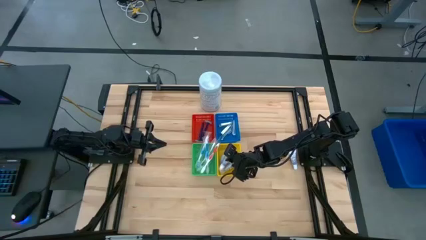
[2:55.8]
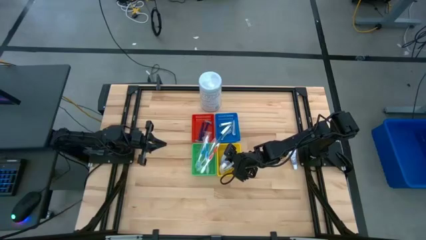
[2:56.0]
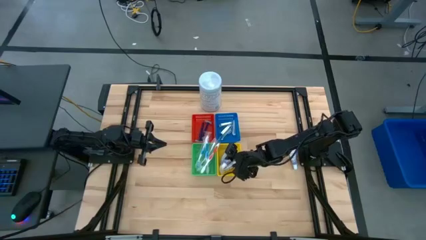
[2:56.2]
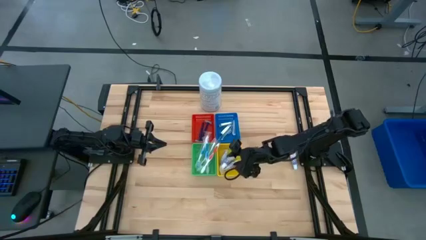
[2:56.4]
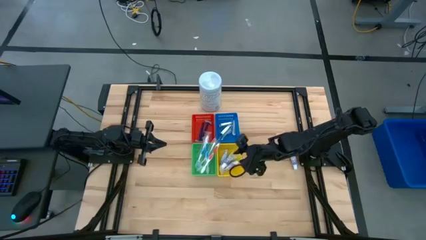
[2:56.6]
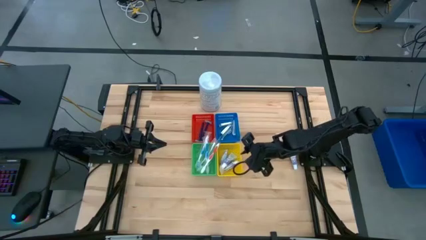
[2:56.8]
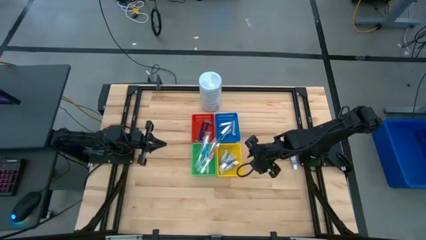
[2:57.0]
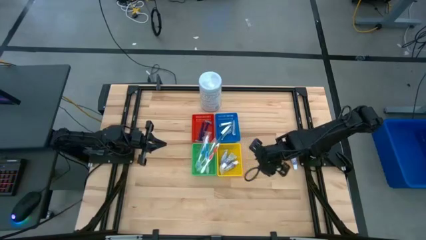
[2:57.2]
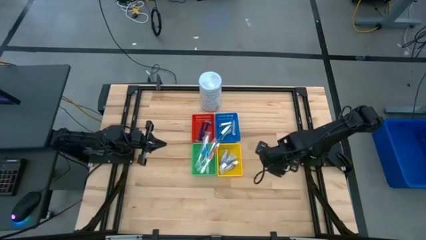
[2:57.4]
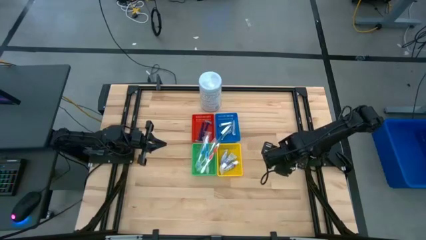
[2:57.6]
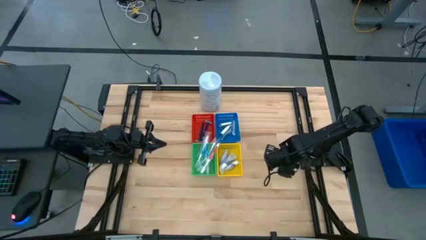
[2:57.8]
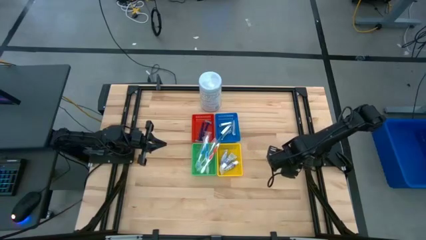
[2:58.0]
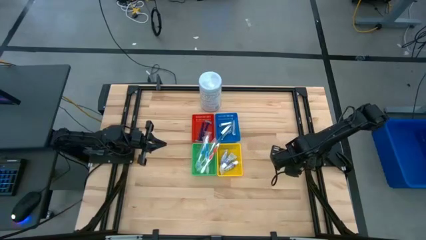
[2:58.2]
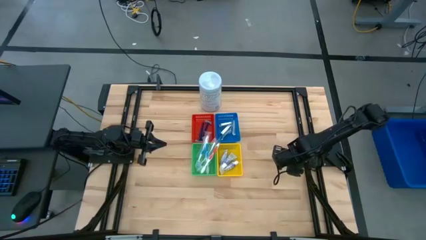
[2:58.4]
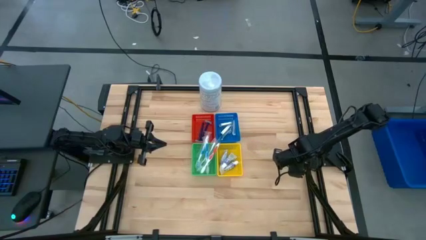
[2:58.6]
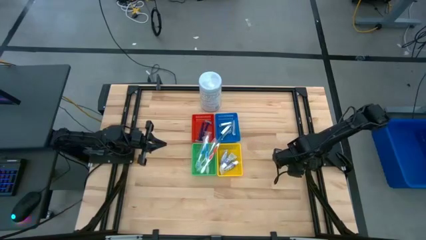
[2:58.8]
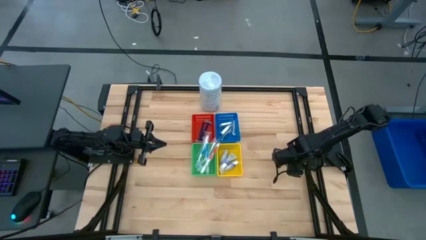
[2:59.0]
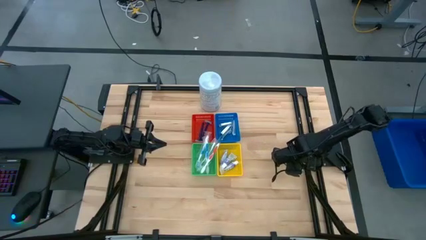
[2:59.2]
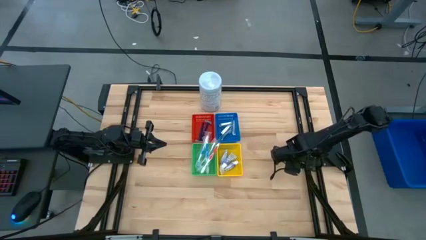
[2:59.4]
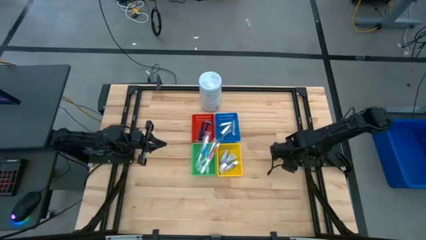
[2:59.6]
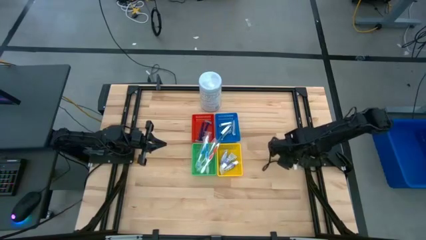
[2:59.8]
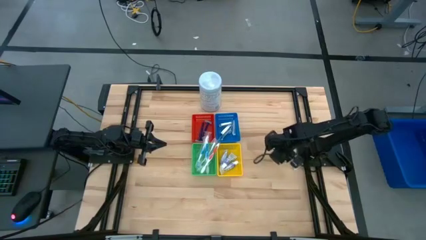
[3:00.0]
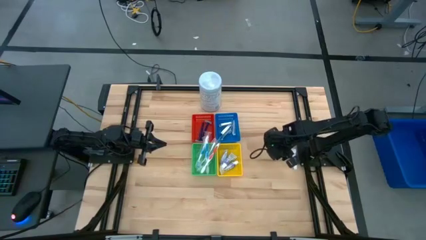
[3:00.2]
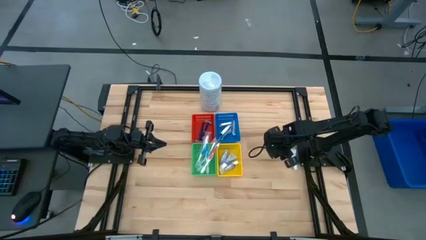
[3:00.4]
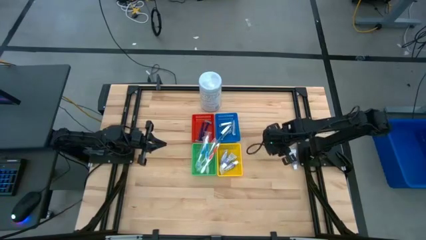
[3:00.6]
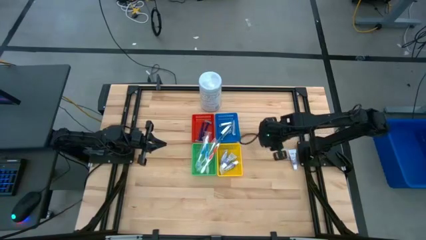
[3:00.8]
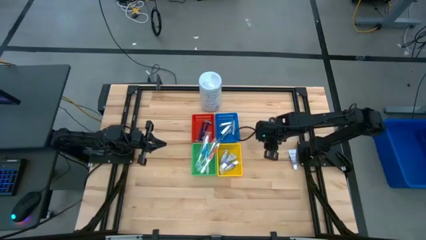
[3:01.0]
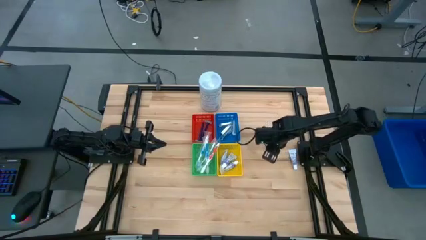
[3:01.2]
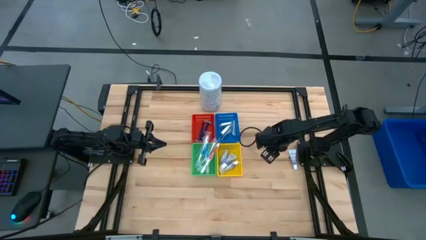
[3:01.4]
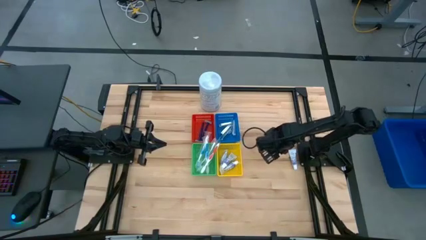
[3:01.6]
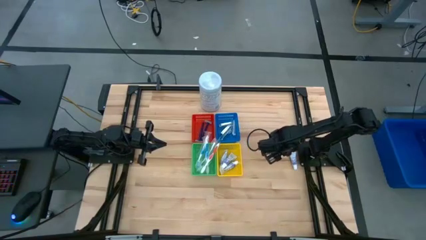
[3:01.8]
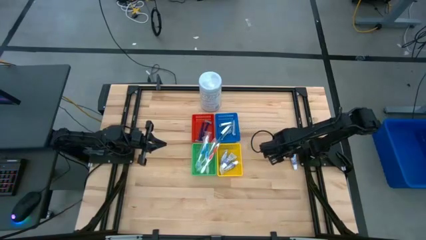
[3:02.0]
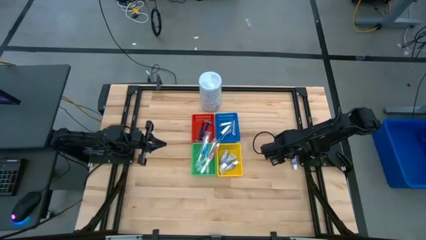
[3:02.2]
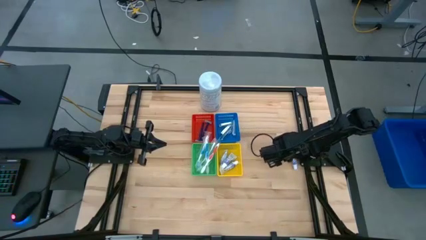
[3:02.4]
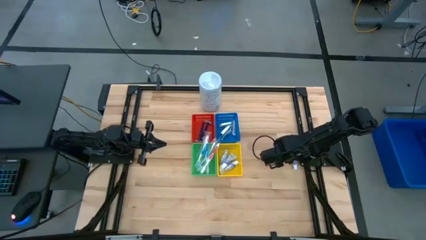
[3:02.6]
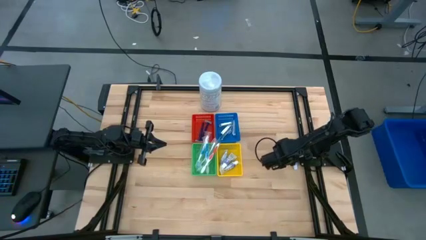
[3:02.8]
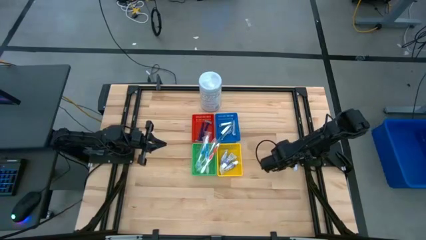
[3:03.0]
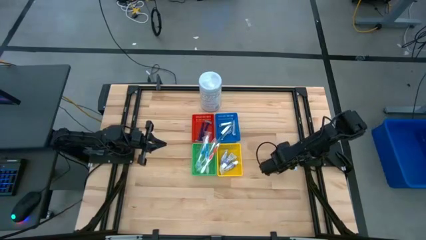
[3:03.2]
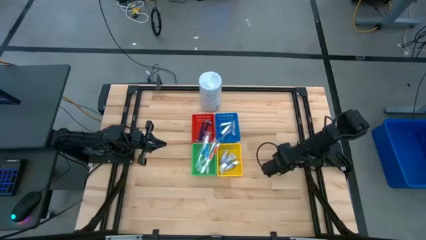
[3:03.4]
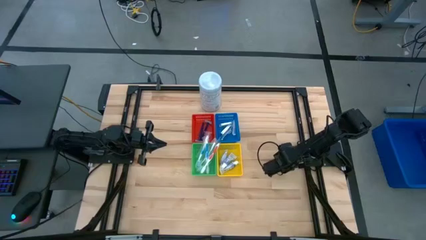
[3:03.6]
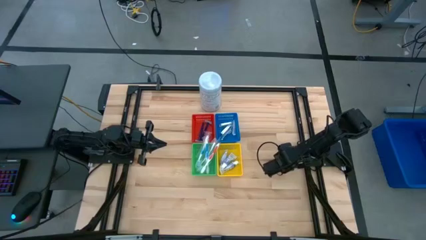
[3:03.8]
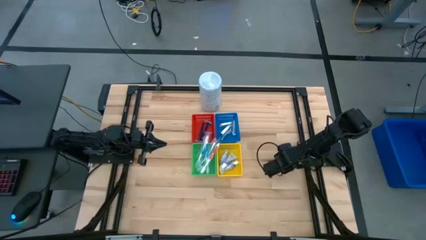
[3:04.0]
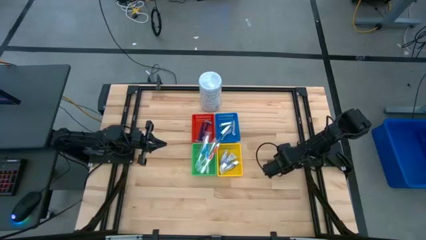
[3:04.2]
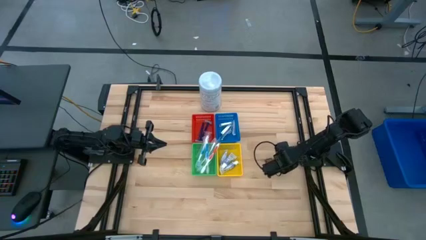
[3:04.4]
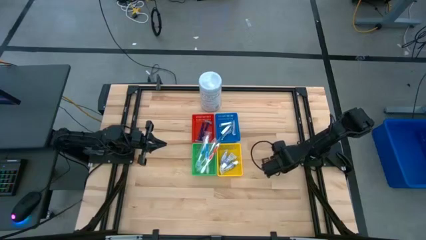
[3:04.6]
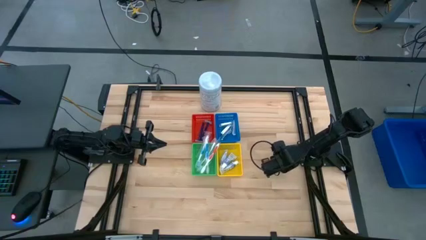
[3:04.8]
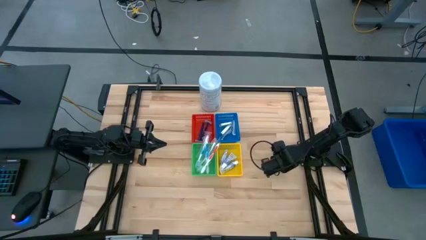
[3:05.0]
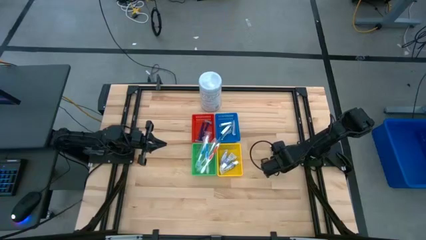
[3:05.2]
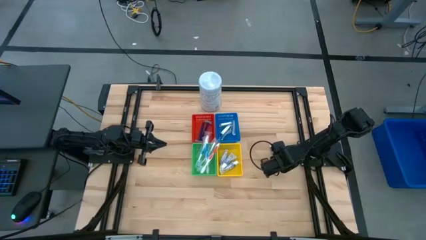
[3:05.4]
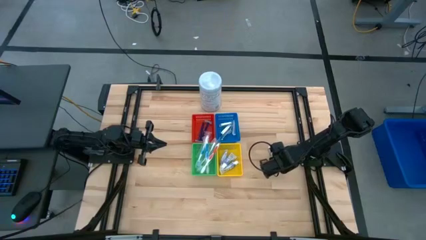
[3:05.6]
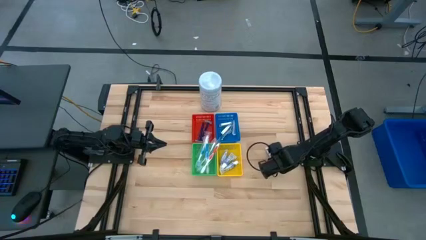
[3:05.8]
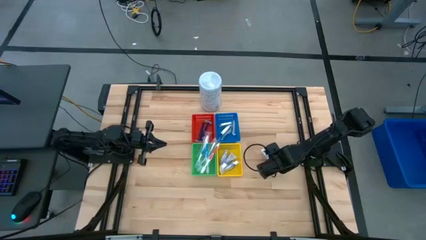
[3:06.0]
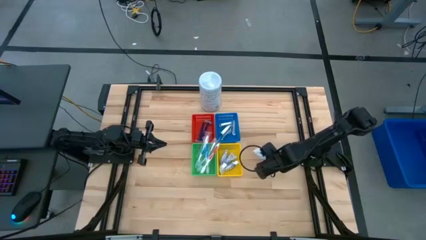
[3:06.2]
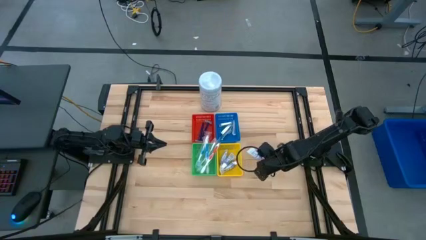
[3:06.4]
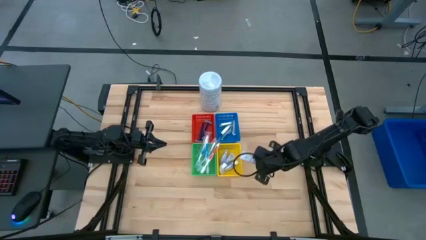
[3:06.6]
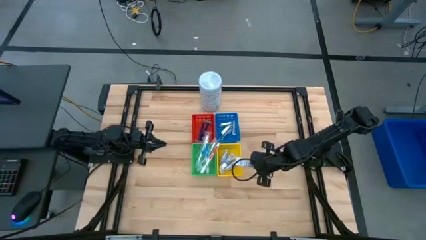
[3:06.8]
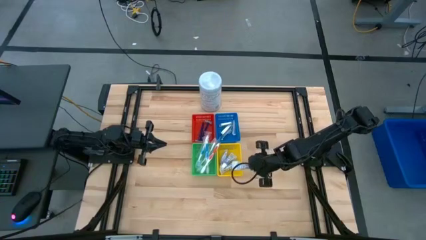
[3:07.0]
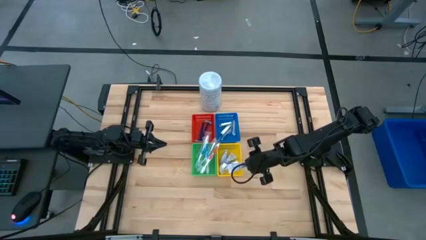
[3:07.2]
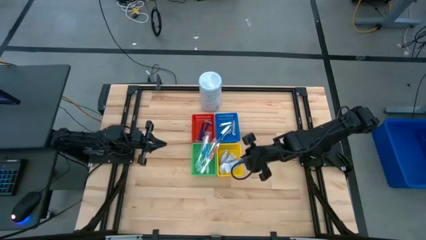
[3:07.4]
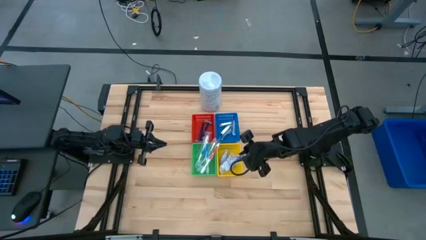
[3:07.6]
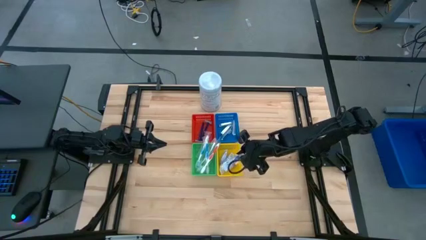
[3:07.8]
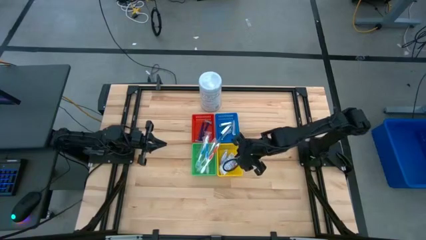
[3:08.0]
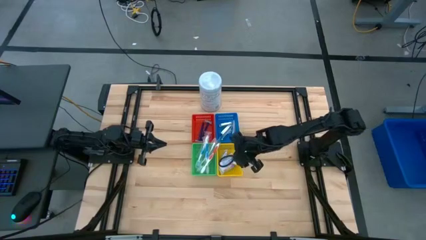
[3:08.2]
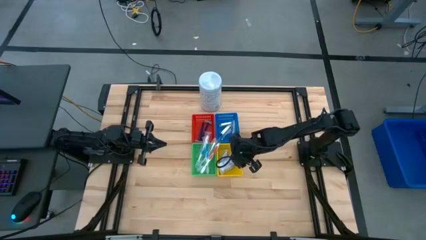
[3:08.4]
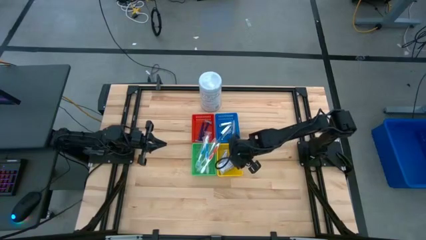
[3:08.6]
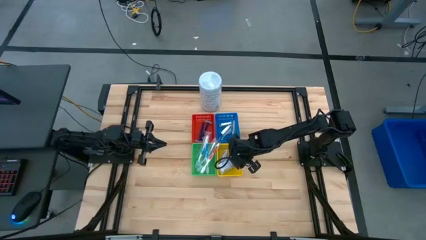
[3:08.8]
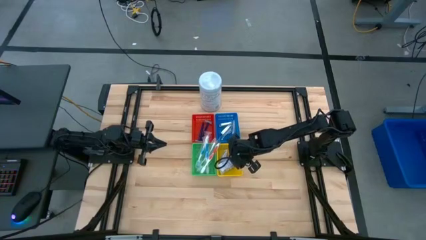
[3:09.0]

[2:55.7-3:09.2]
Task: Pick & Place Travel size toiletries
Put the white toothpaste into the yellow bin

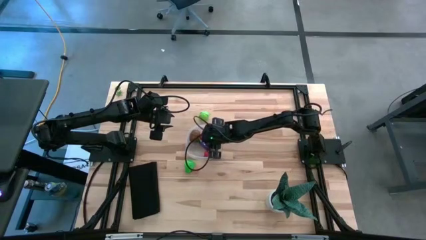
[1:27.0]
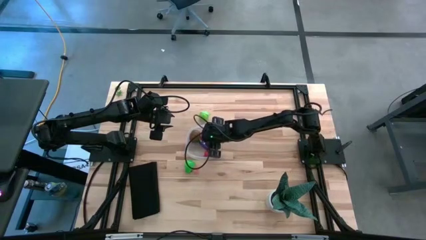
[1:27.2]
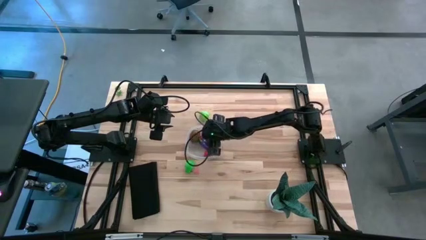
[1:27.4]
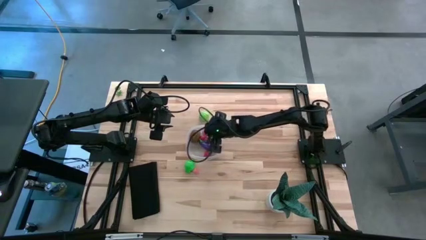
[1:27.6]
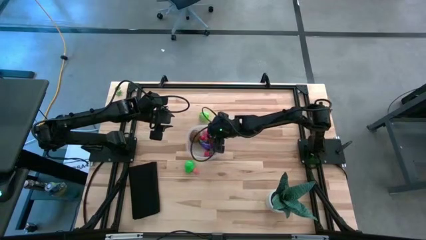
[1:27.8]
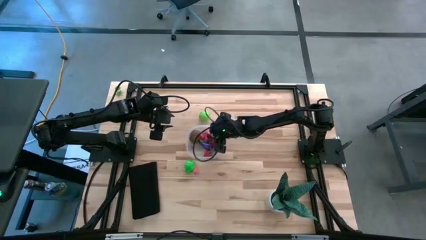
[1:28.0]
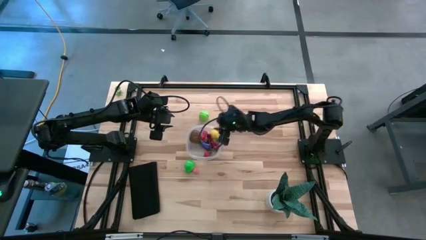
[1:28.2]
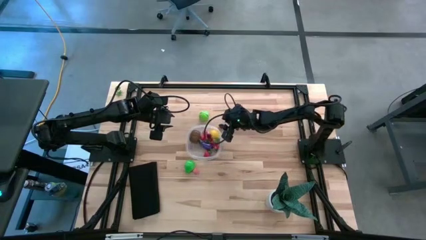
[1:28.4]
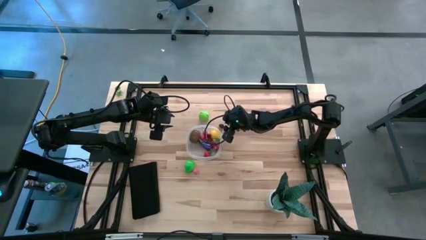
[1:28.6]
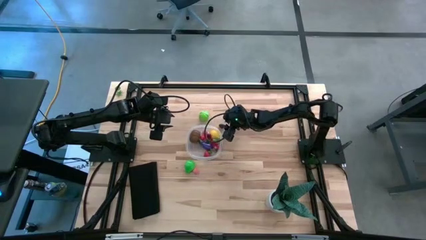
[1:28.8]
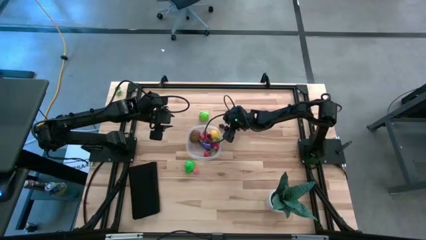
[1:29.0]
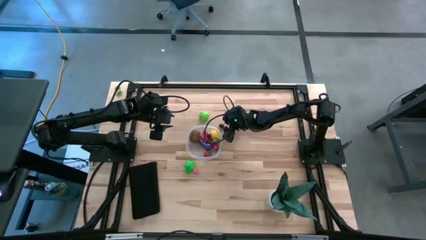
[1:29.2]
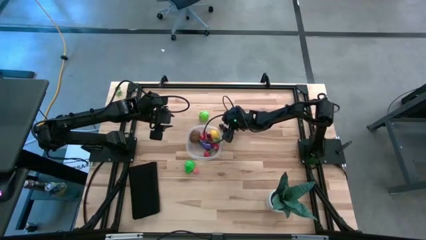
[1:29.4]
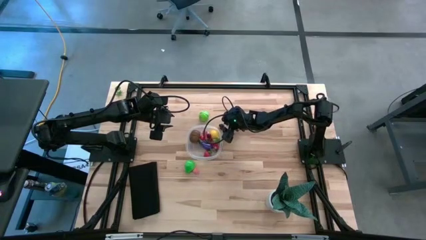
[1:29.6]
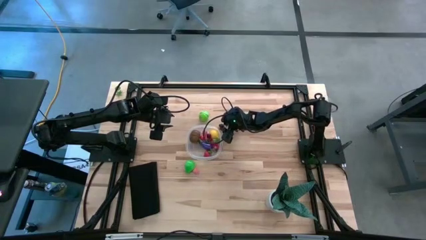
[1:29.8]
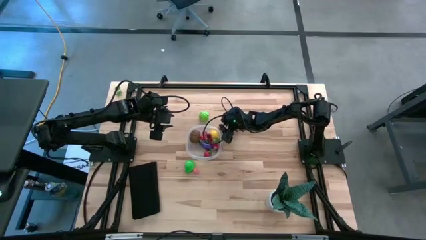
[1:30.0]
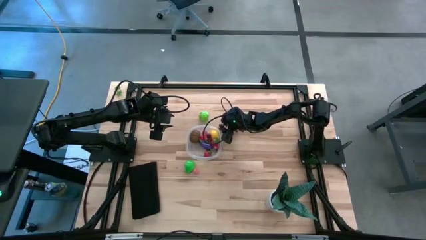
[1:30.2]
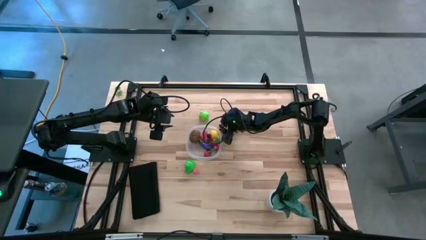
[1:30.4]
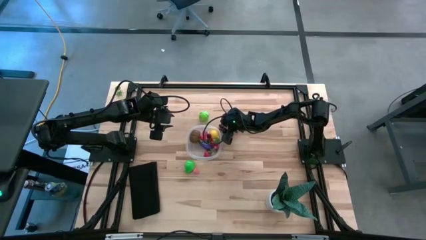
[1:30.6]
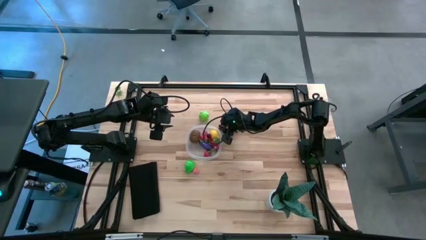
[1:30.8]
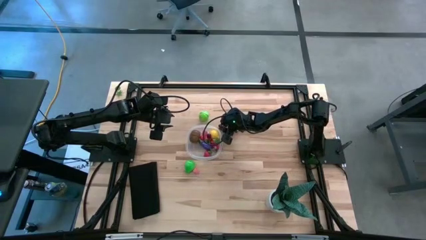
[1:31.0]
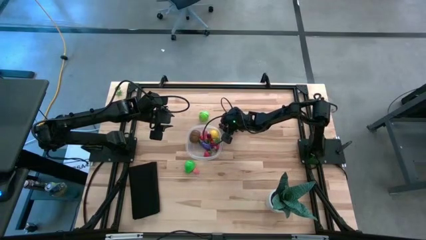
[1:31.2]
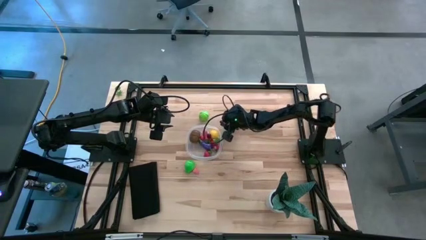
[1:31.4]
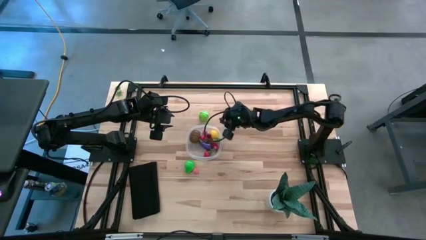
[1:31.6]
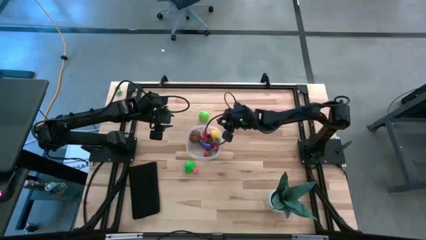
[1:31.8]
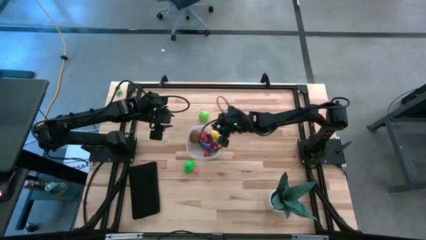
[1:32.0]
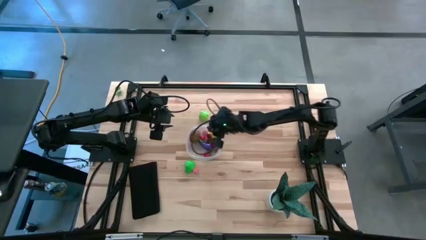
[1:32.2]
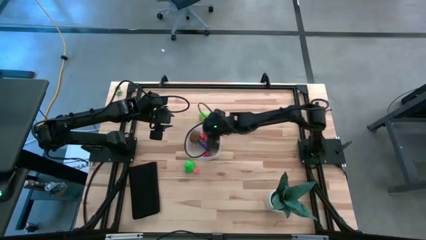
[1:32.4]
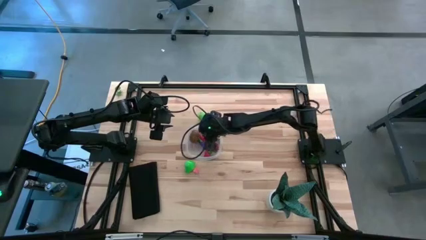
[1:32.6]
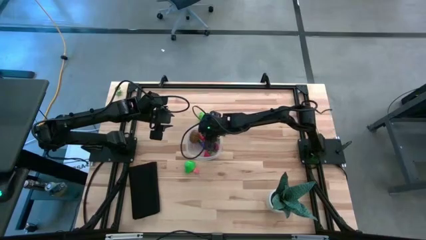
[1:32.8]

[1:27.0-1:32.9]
Task: Pick and placing Produce into tupperware
Put the blackberry into the transparent bin
